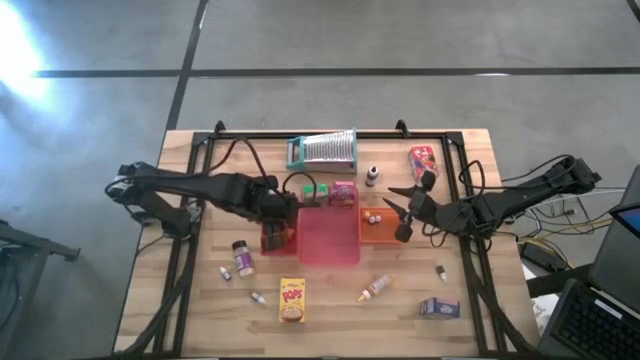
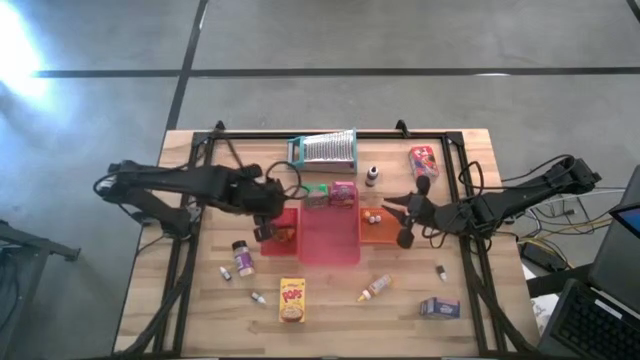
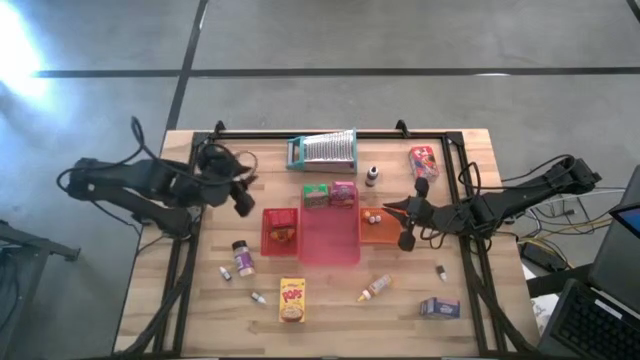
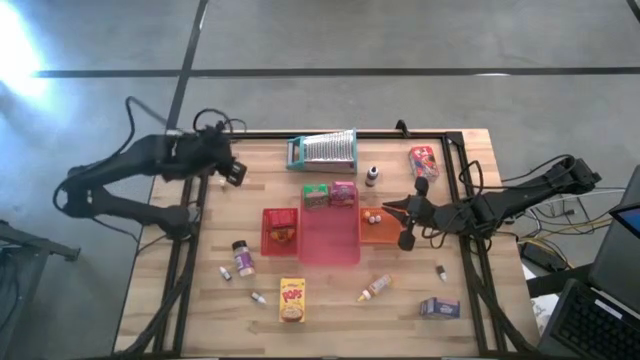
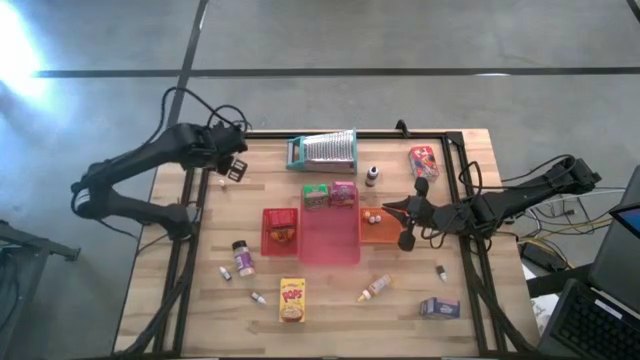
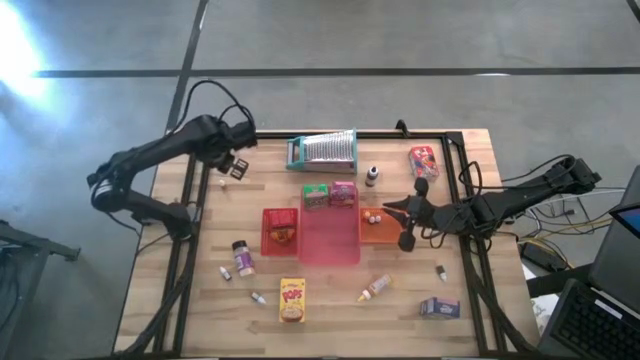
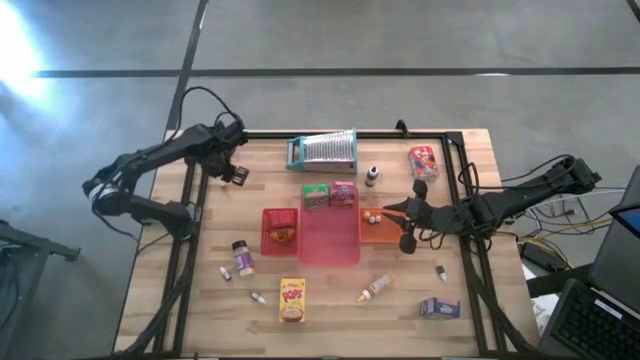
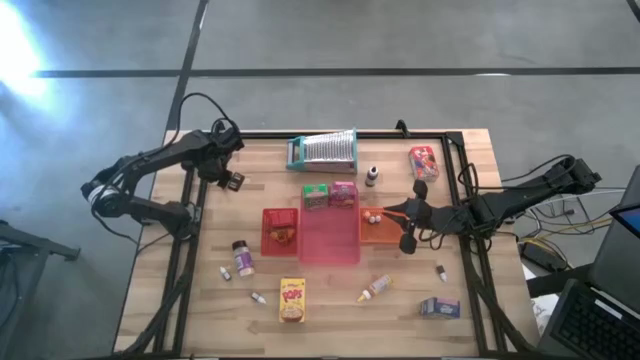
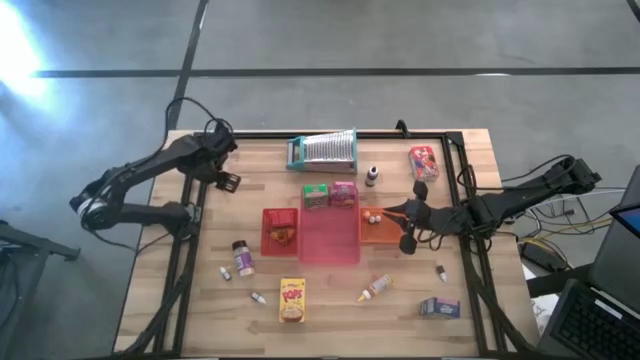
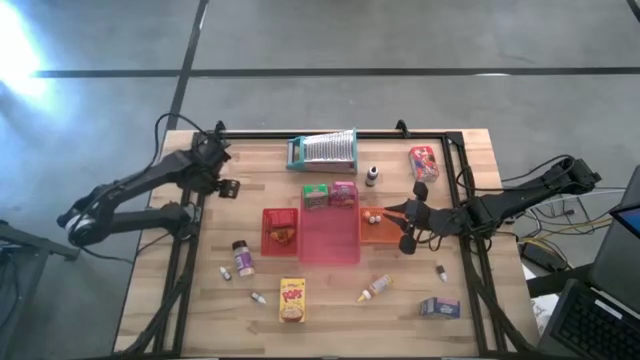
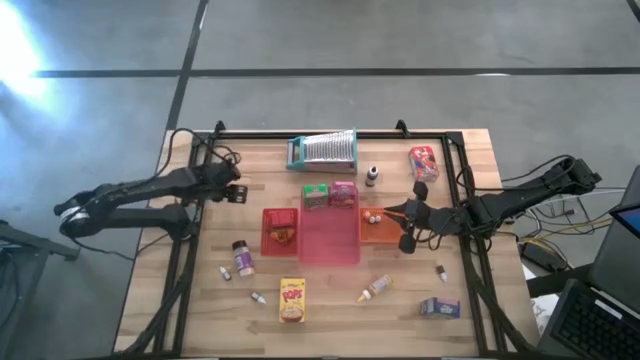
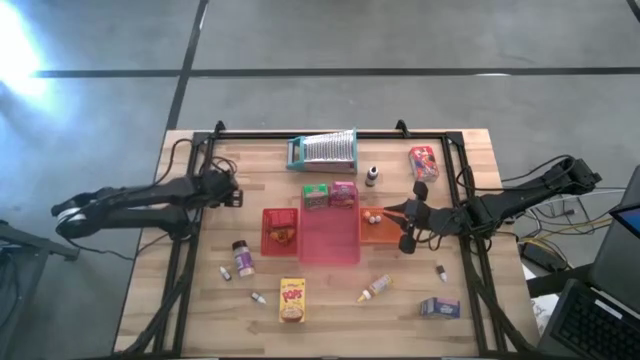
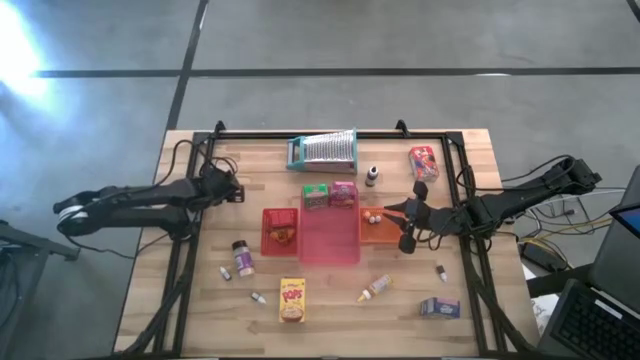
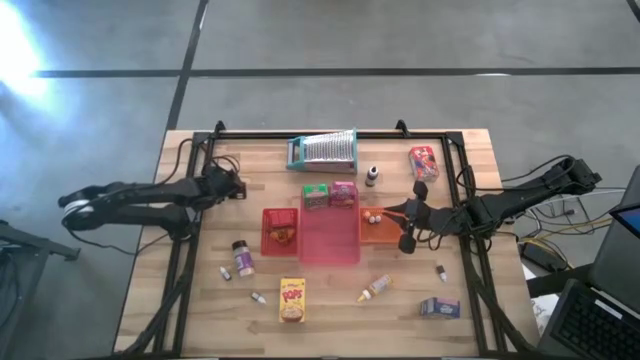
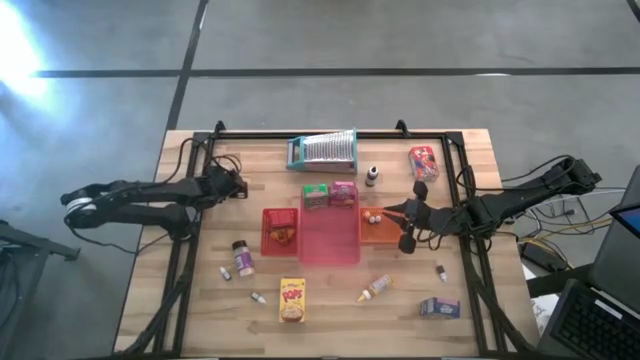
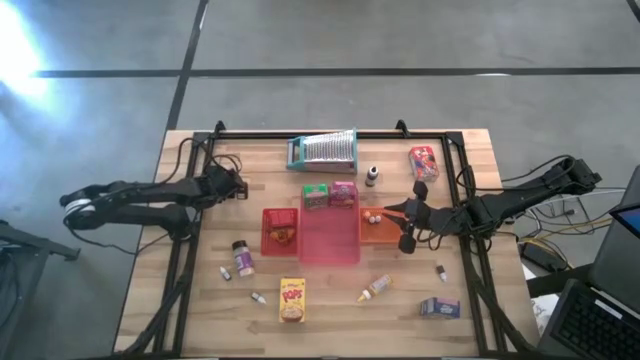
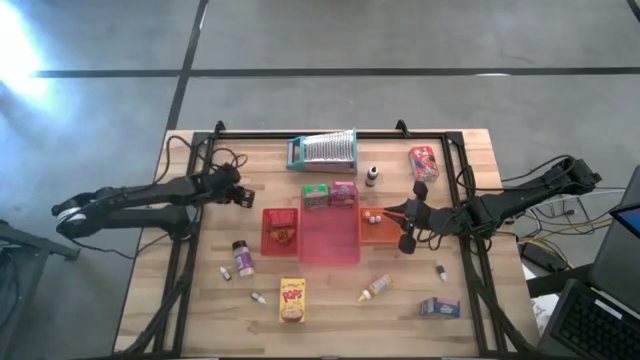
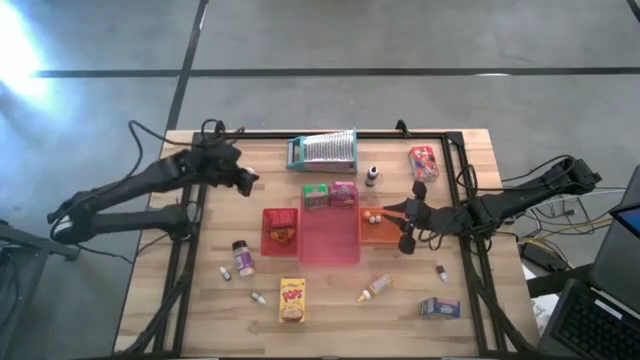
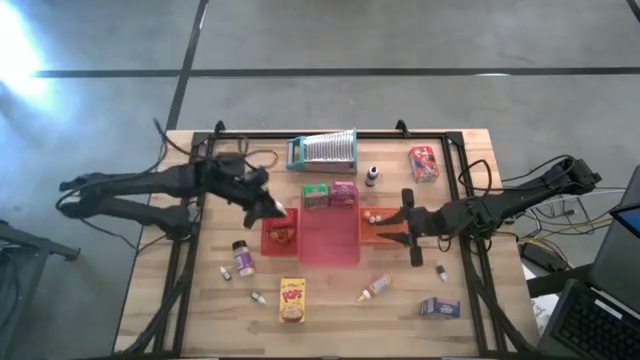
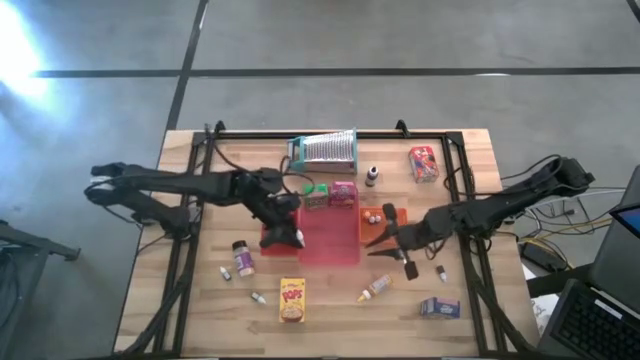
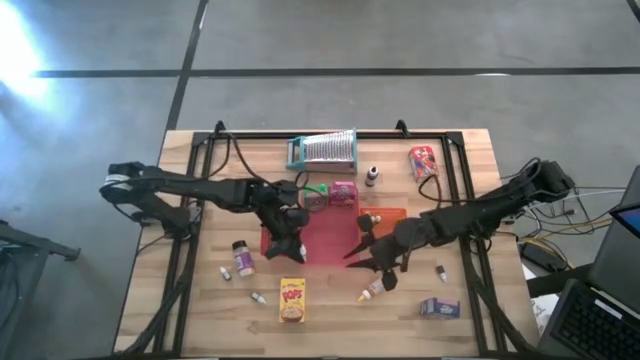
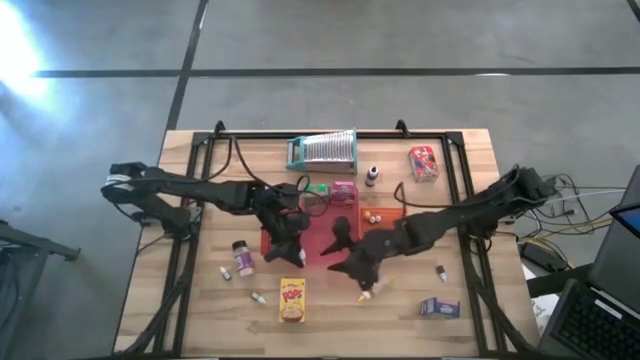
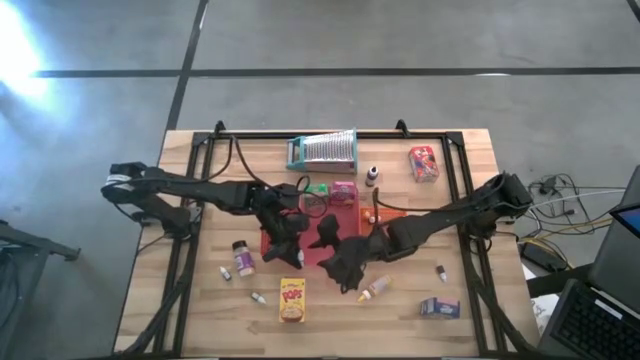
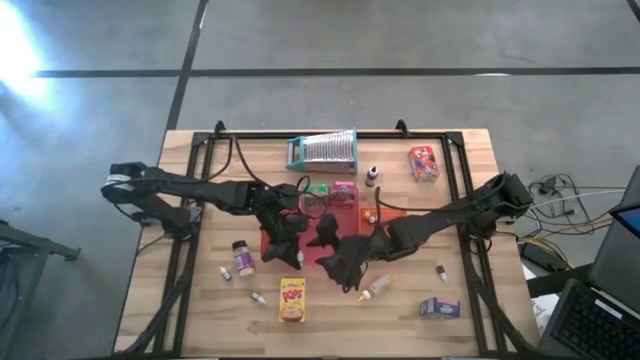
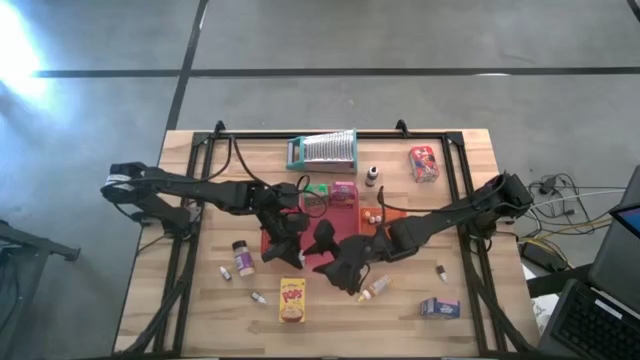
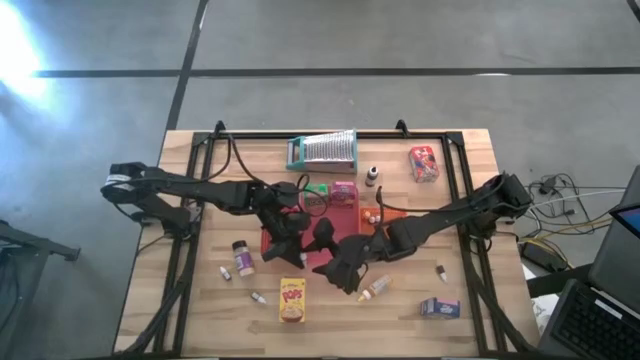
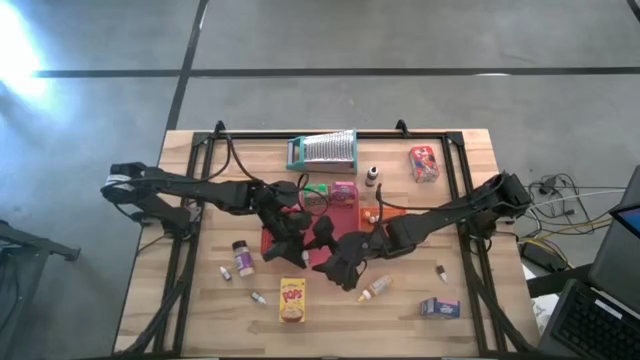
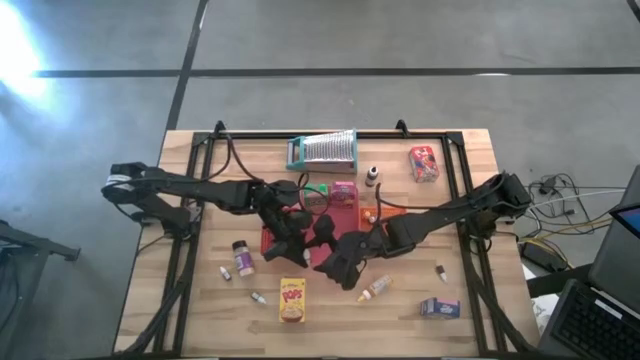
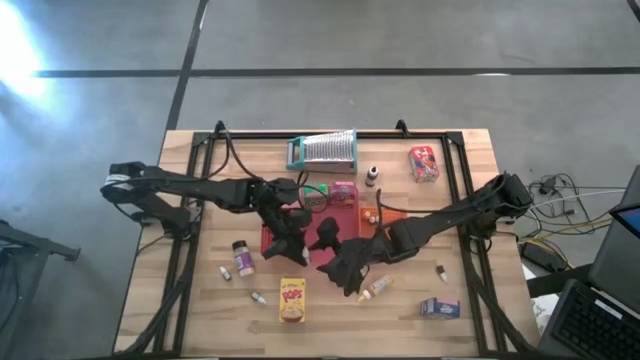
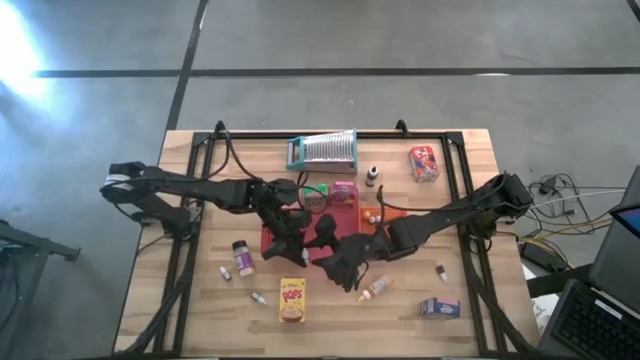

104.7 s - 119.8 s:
Task: Pick & Place Kitchen Items
Put the small orange food coloring bottle into the orange bin

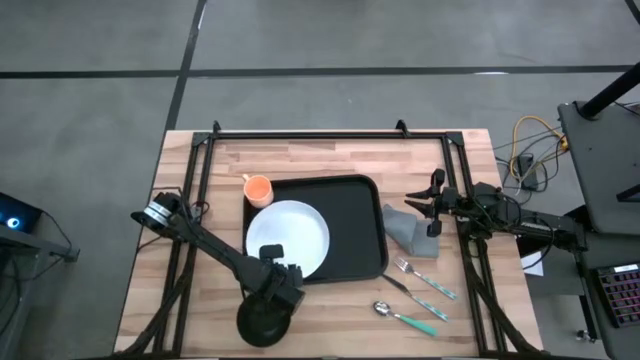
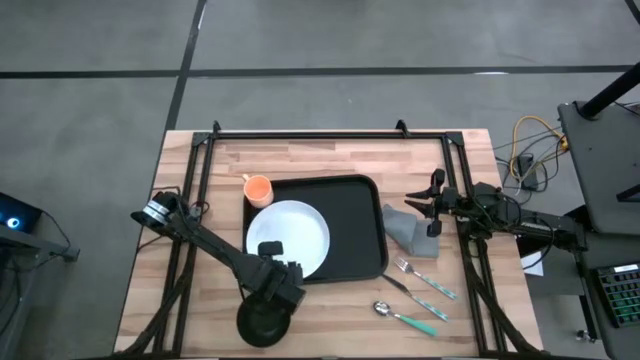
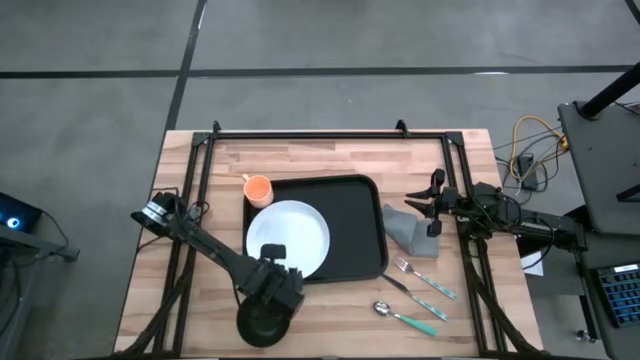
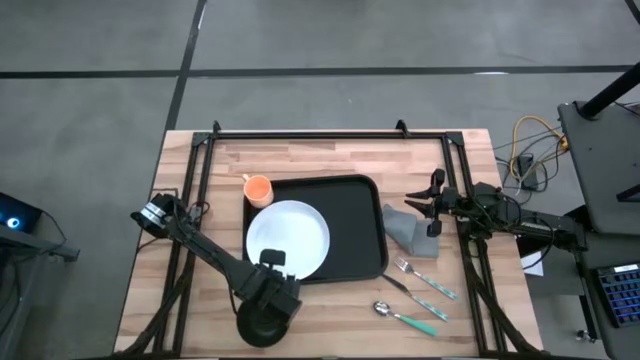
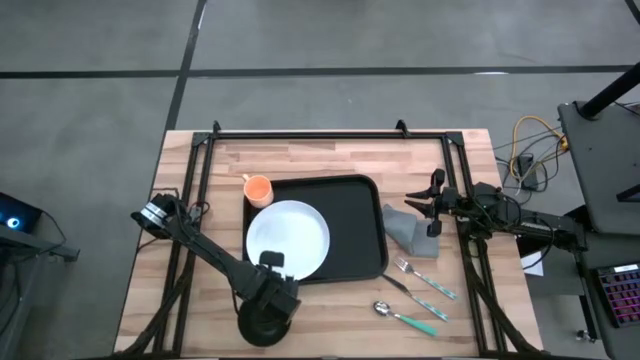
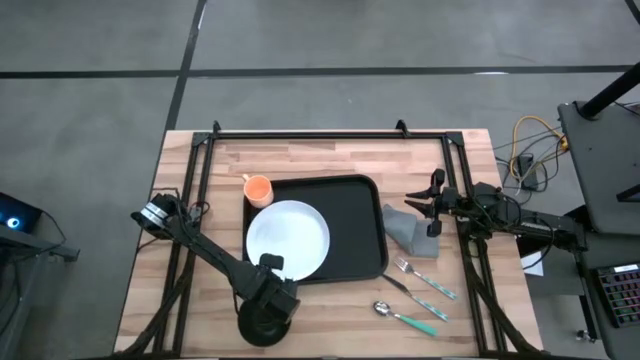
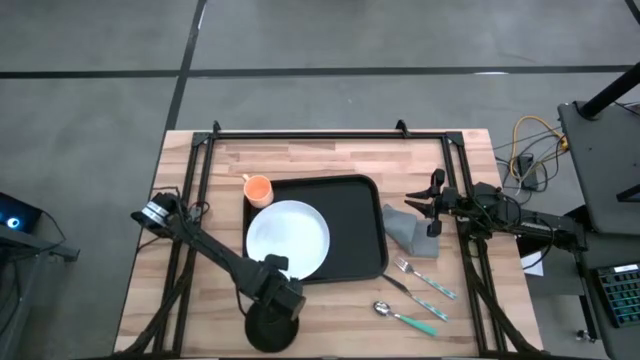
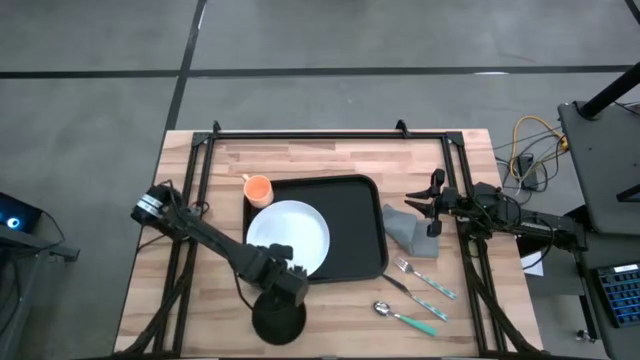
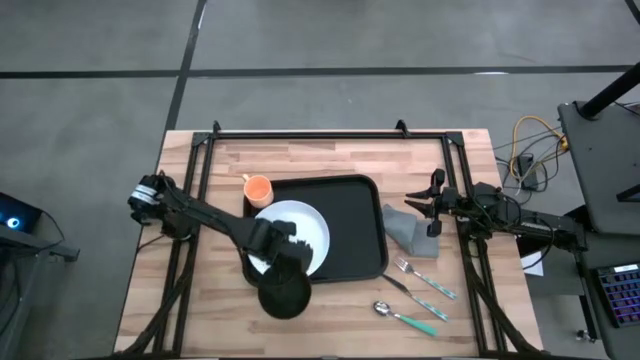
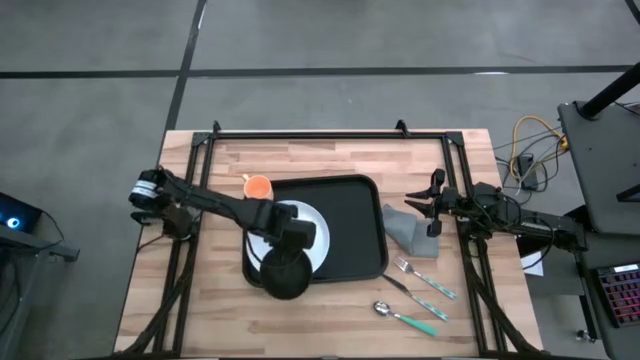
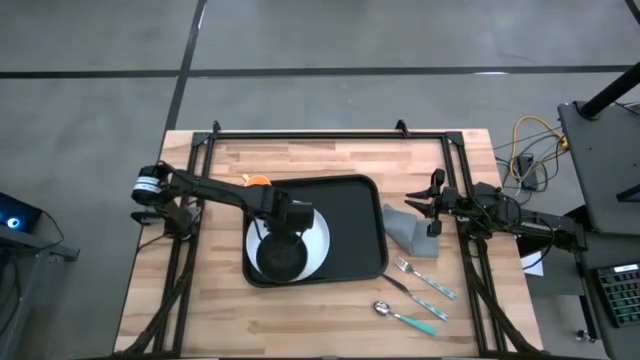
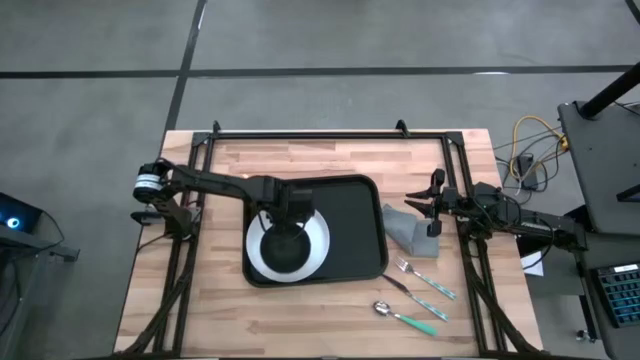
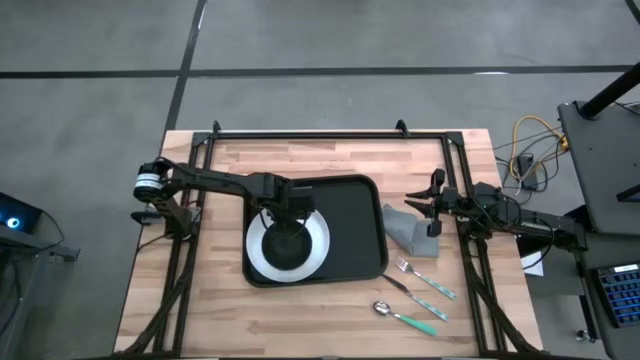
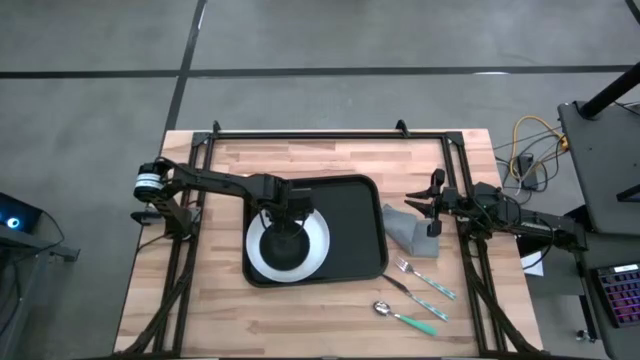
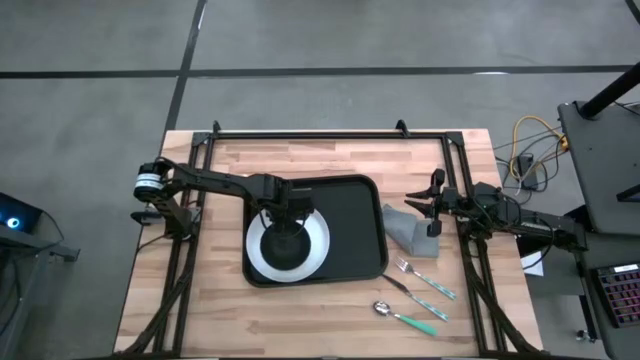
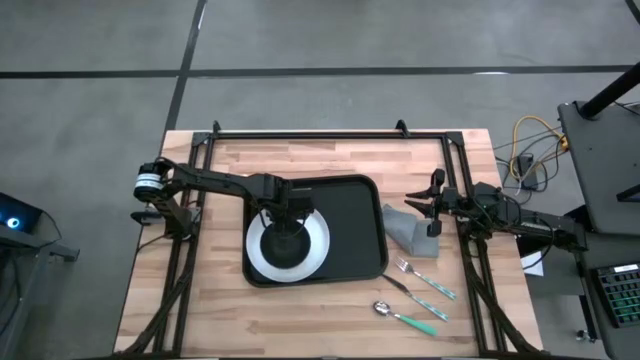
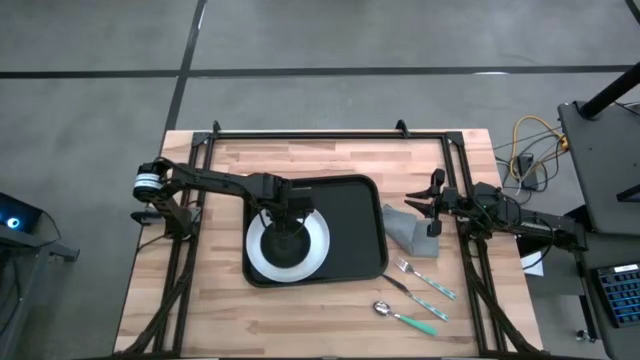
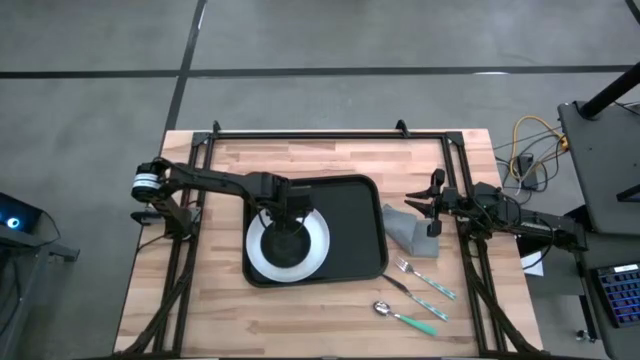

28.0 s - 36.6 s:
Task: Set up tray
Put the black bowl on top of the white plate on the black serving tray
